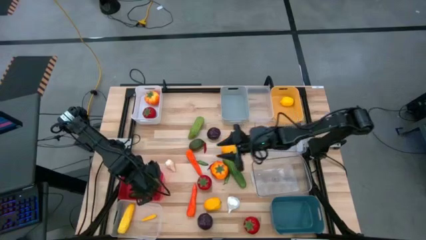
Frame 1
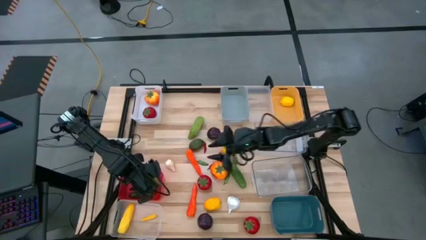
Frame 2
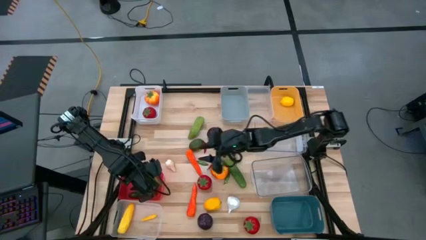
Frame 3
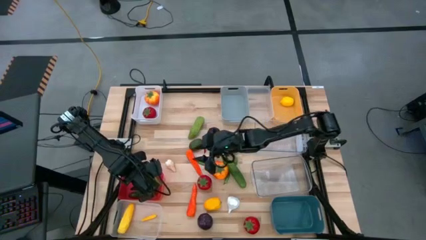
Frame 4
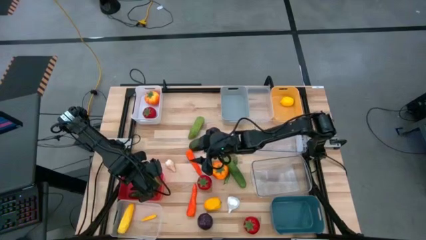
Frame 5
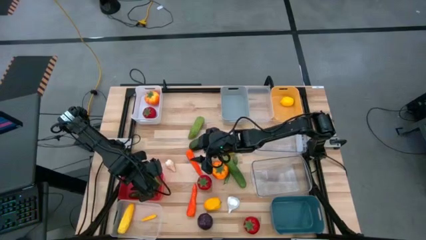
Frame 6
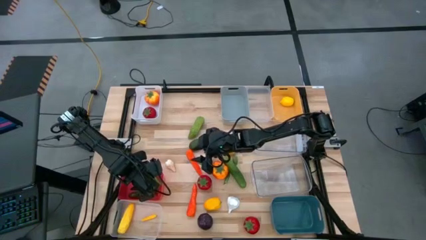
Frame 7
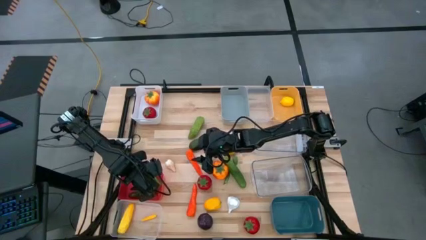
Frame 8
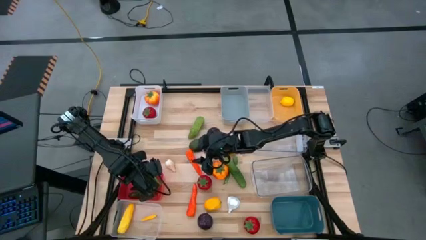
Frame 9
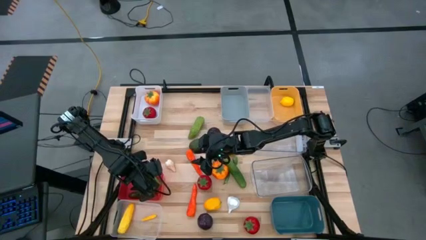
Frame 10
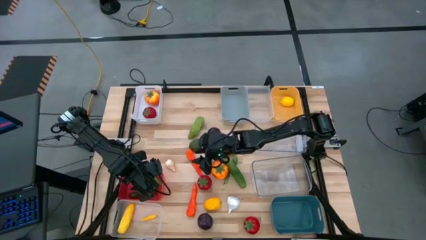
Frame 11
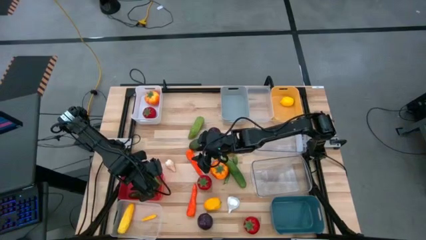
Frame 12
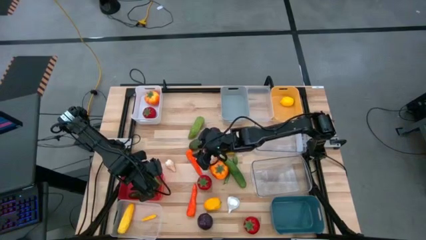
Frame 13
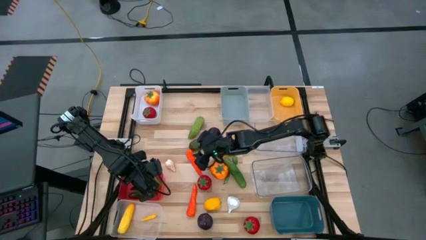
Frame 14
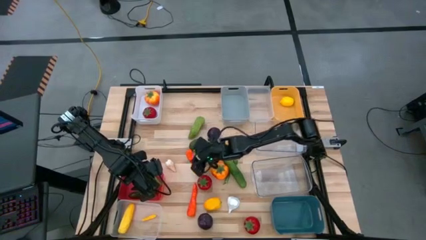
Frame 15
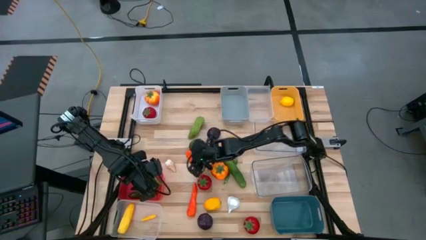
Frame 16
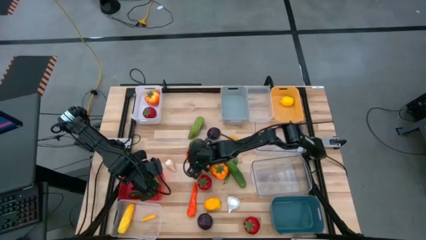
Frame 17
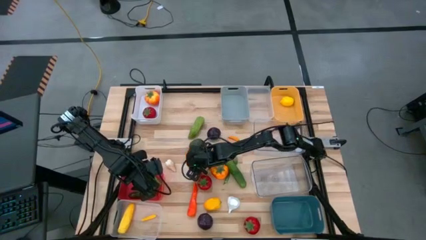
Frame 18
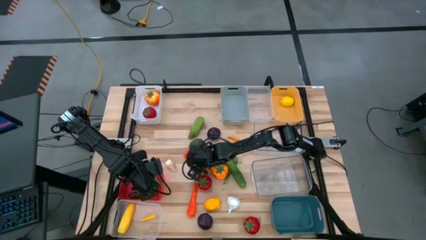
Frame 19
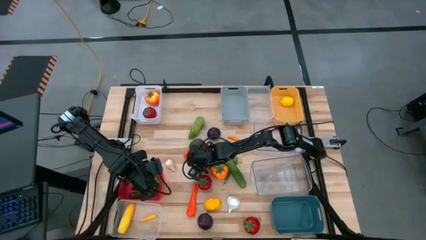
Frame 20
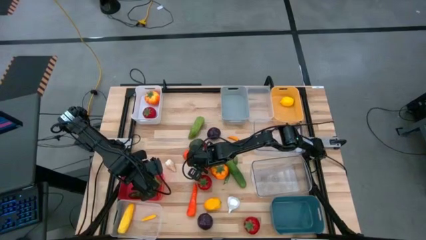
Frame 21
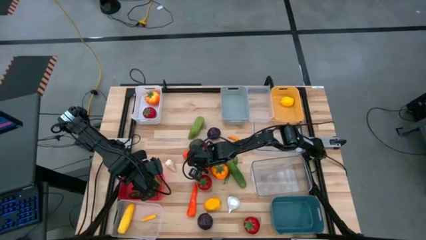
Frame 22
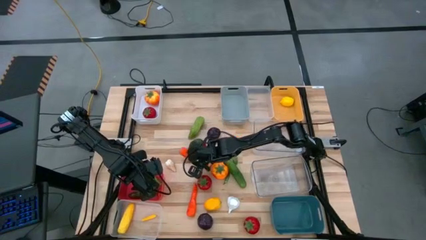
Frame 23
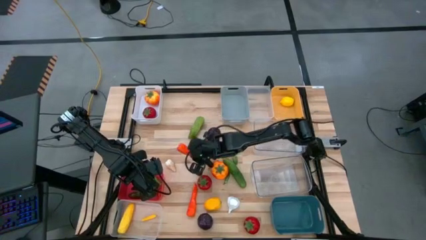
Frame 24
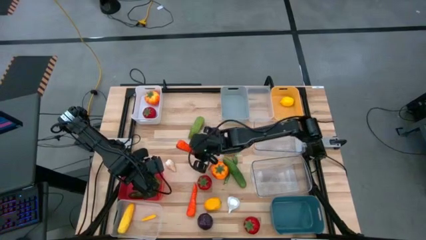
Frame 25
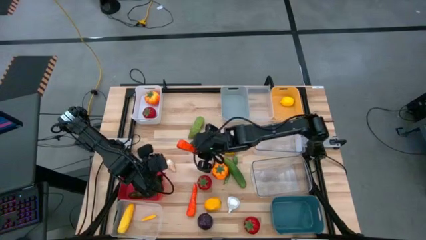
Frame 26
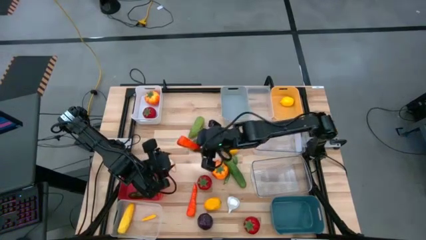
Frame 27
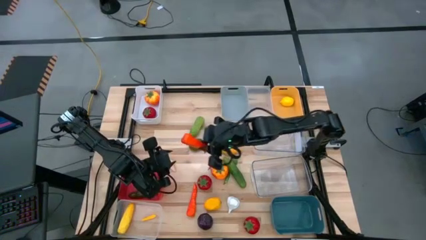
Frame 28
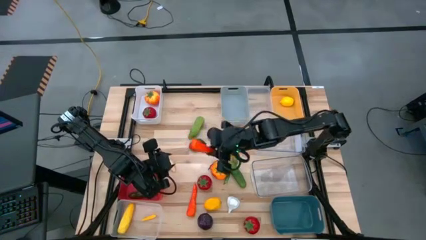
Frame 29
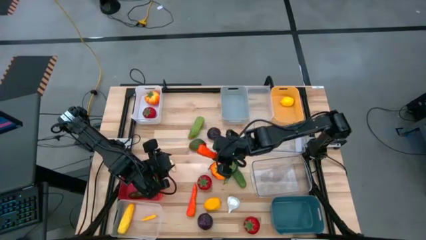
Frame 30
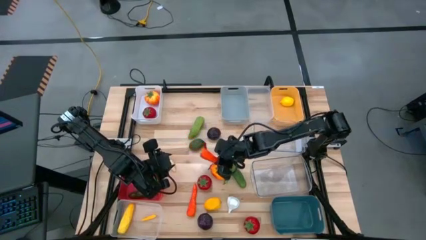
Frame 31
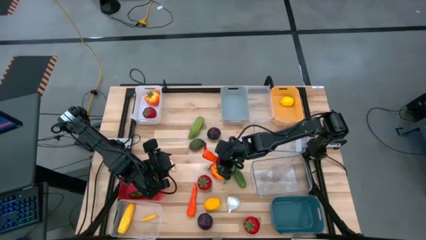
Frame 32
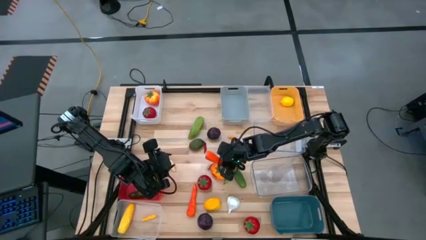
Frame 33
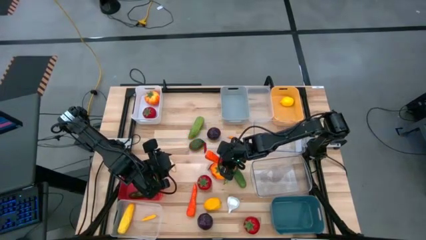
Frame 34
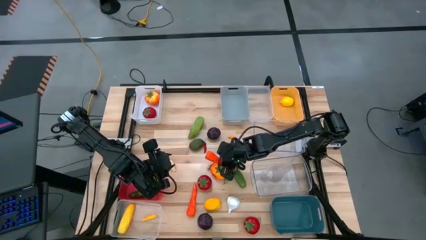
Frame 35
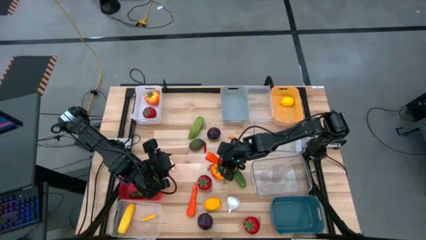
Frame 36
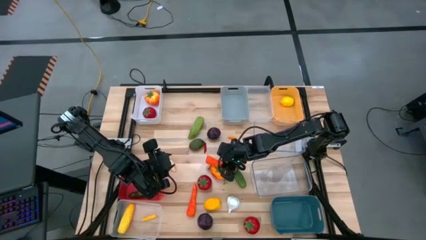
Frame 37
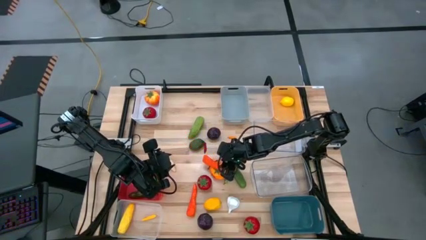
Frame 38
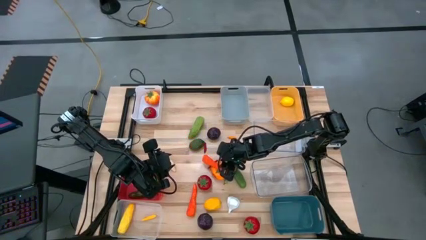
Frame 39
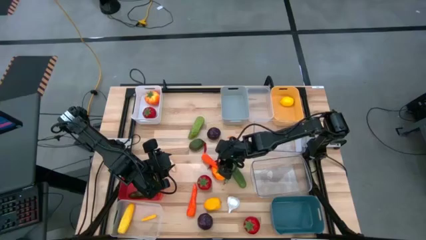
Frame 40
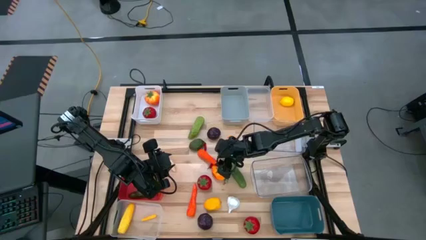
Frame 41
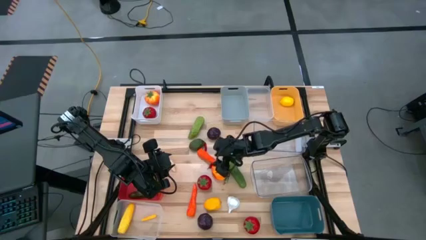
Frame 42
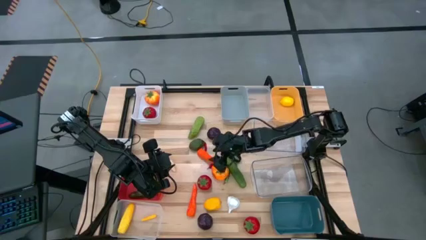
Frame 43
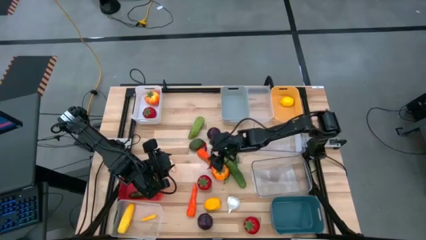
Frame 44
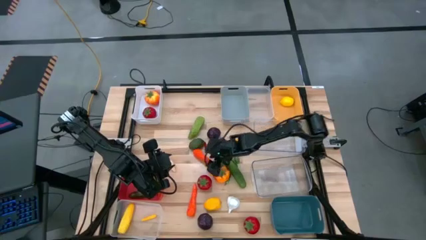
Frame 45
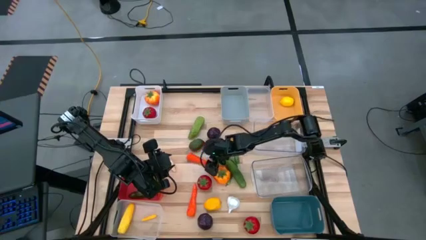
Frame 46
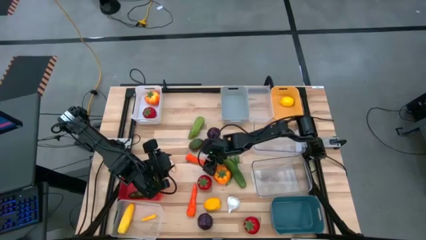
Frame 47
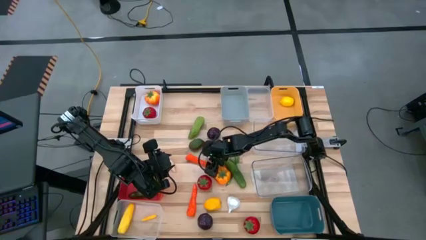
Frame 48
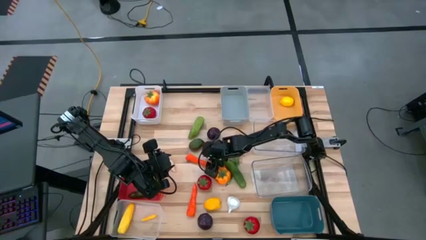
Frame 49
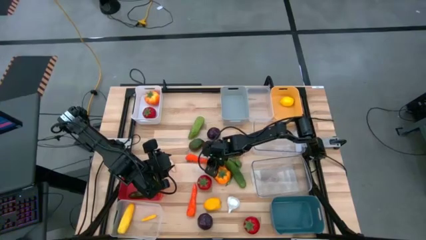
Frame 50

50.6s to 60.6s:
Task: Sort produce into baskets
Put the top carrot into the top transparent bin

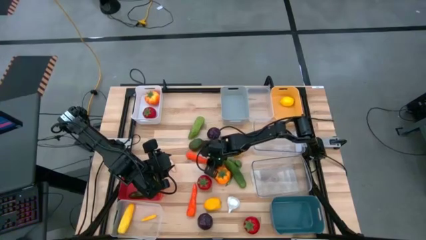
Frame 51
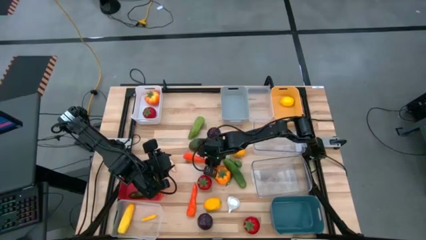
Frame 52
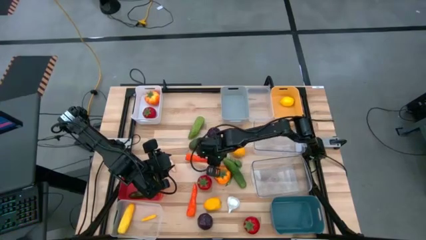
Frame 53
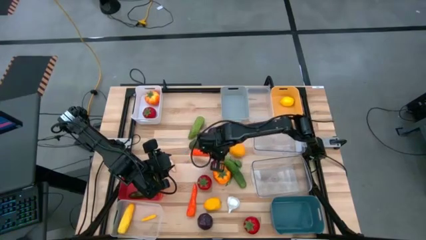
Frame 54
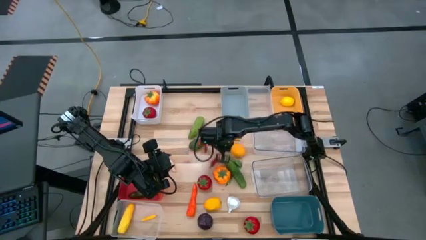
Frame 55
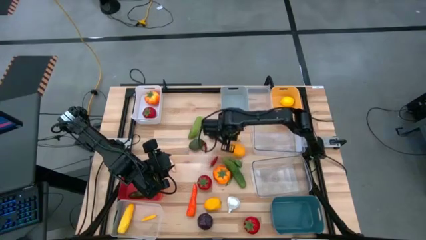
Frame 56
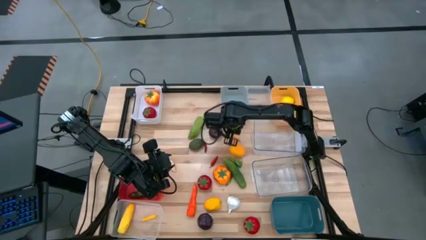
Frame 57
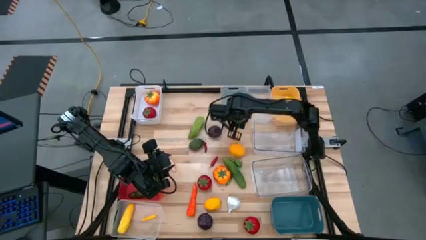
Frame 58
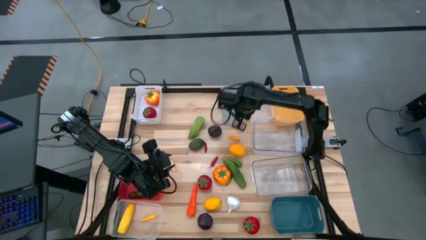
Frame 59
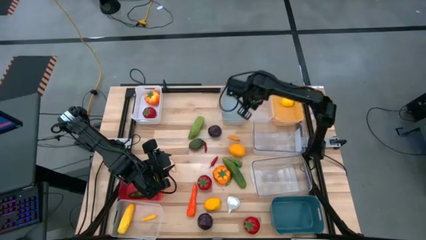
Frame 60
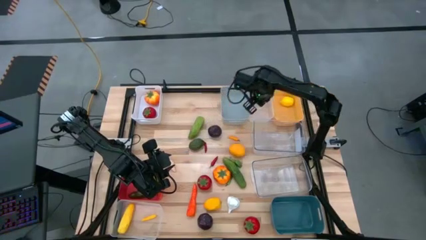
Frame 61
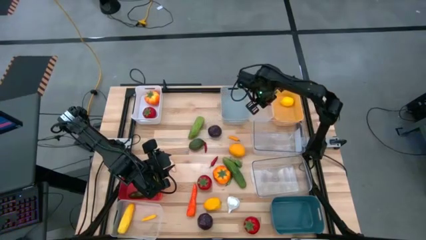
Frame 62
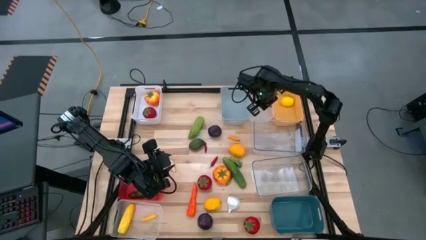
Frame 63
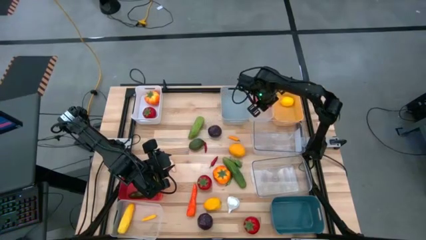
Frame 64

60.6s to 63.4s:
Put the top carrot into the top white transparent bin

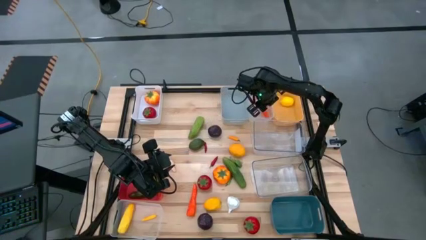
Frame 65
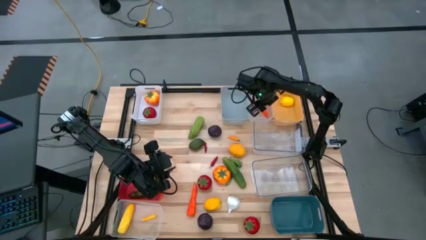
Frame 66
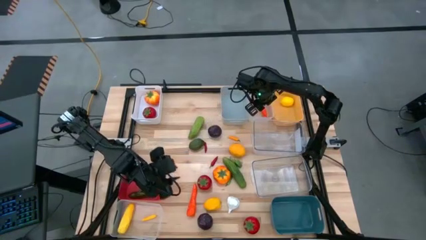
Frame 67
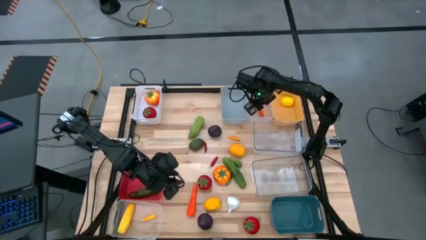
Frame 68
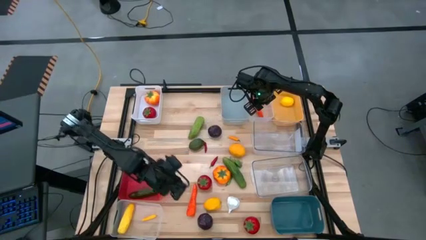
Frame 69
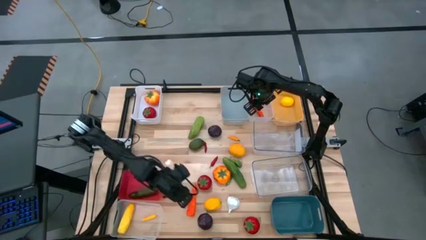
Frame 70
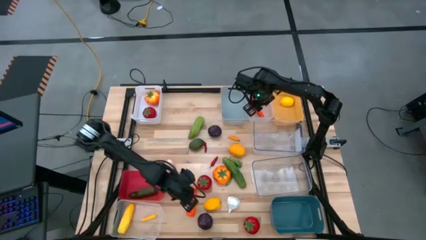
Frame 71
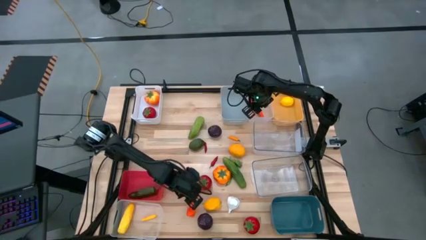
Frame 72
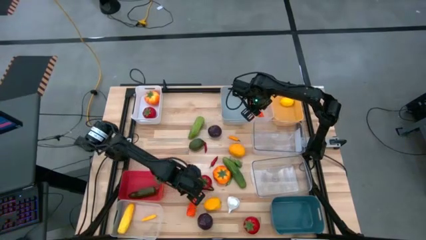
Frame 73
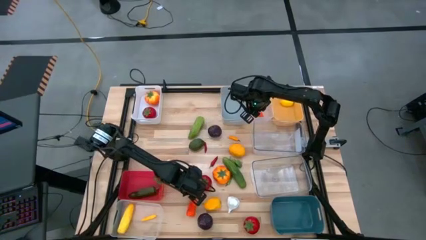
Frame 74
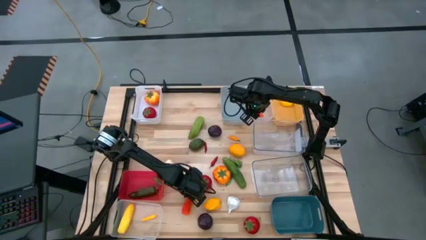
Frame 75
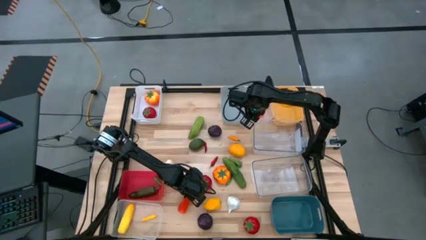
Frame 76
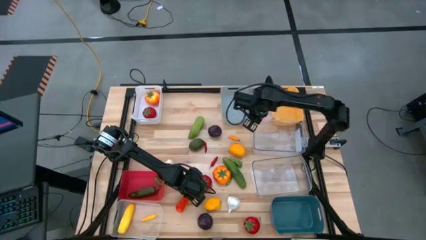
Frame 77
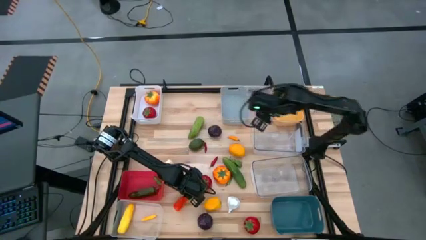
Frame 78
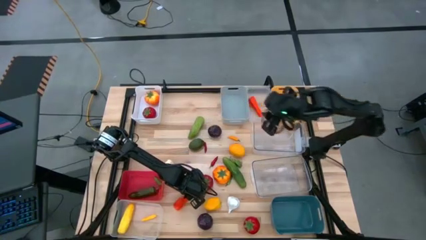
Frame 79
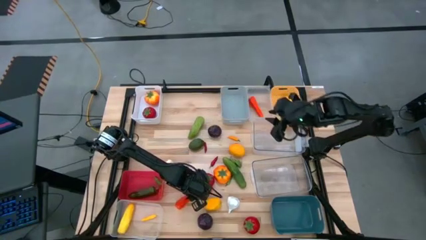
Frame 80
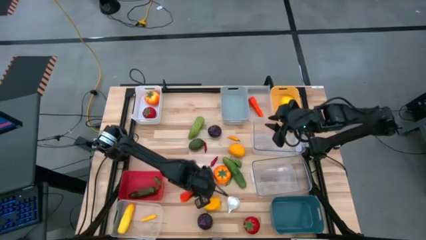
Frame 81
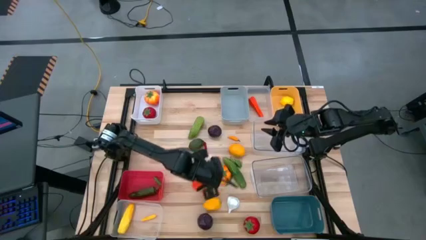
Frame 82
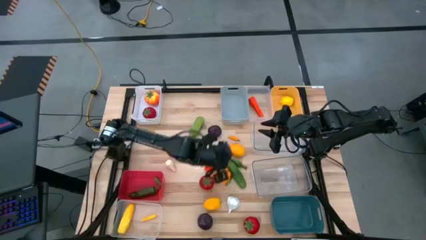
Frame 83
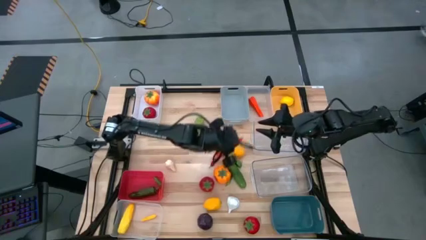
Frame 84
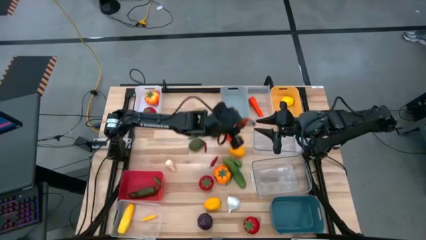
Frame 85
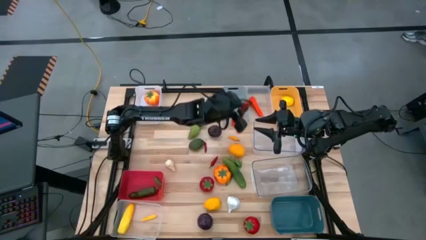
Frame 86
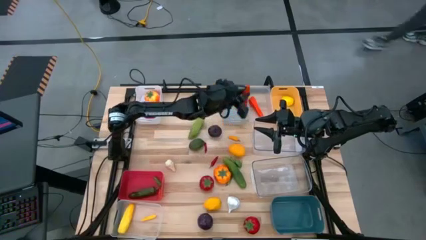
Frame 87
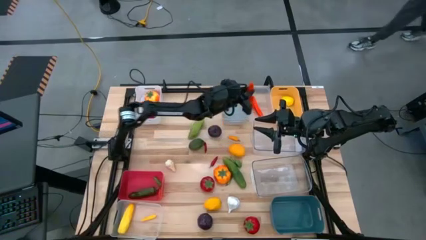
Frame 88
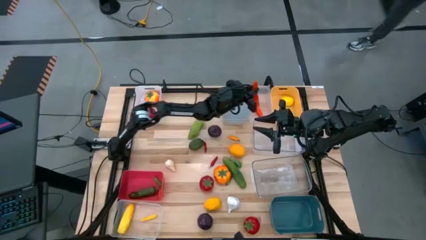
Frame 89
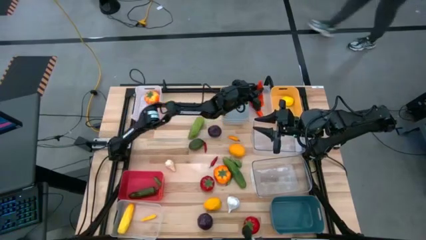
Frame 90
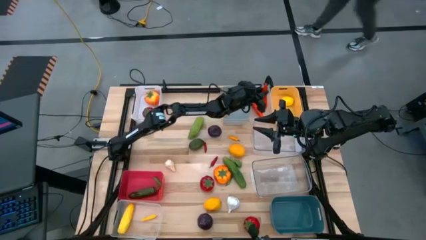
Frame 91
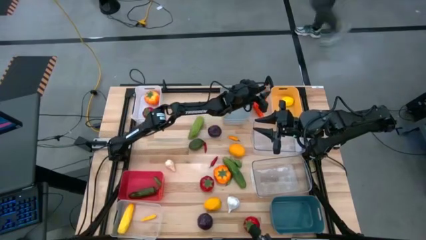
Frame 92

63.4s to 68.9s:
Put the carrot into the top white transparent bin
